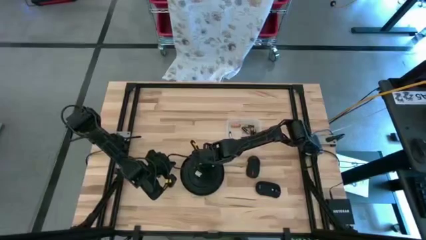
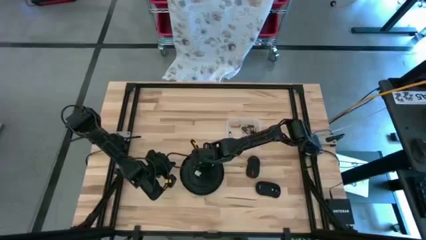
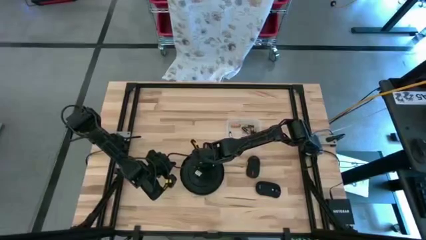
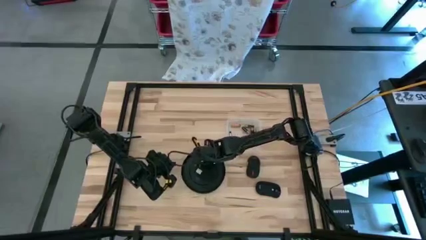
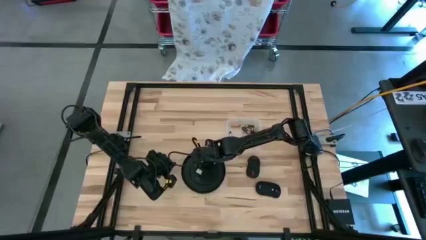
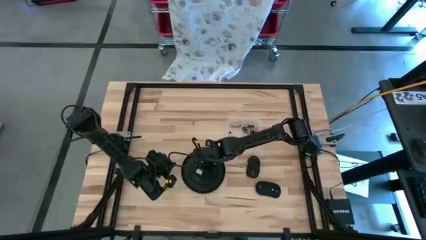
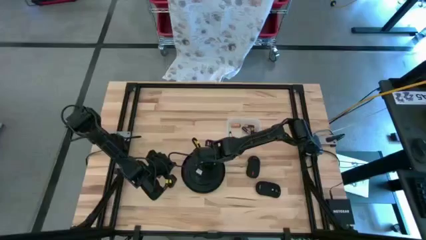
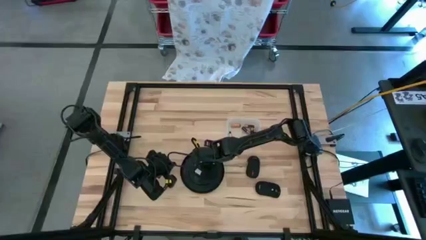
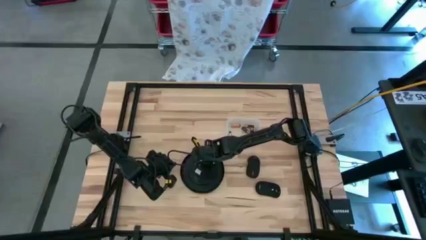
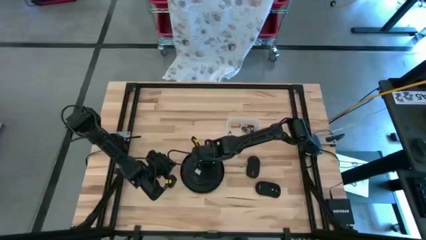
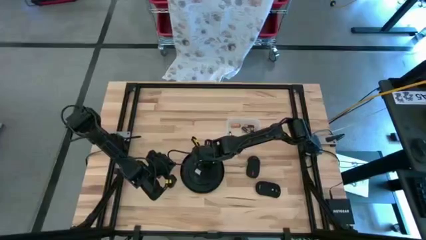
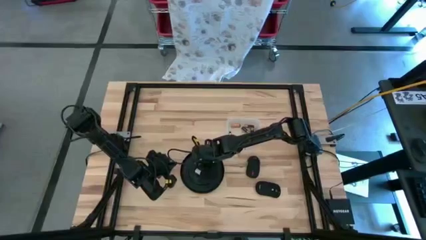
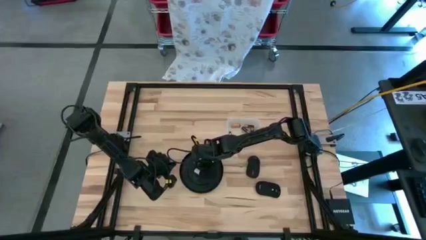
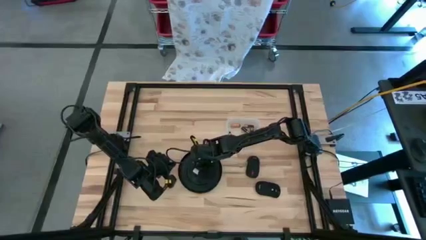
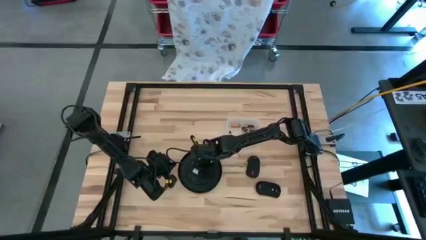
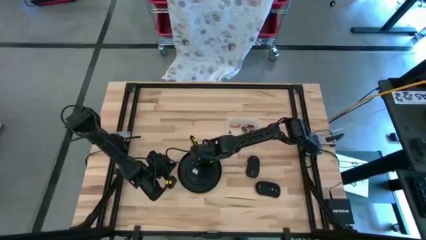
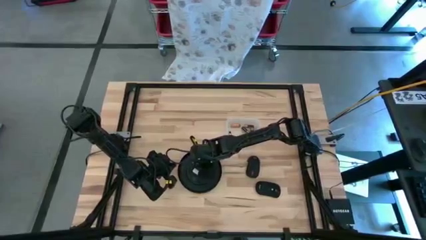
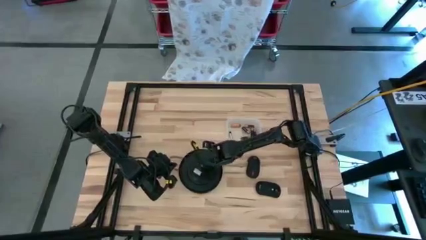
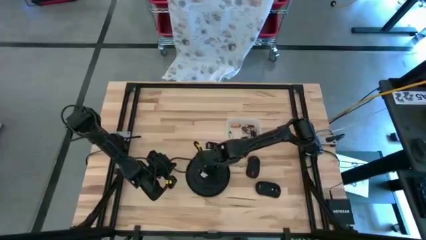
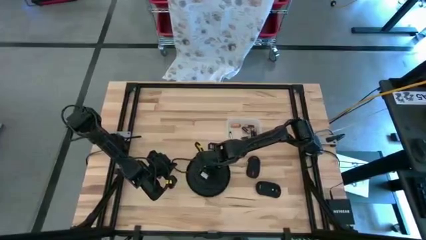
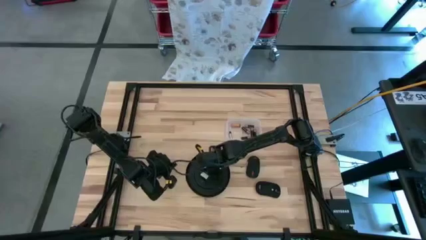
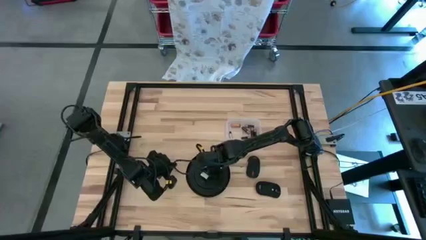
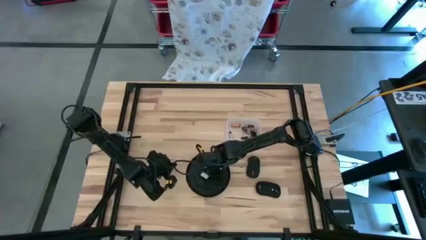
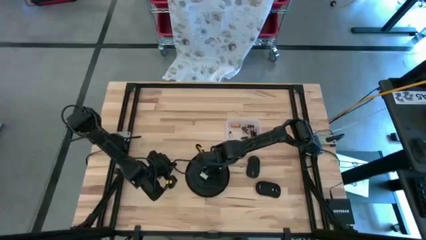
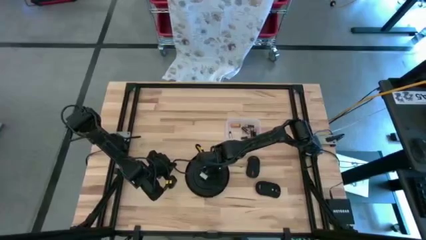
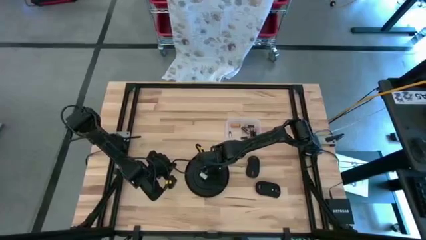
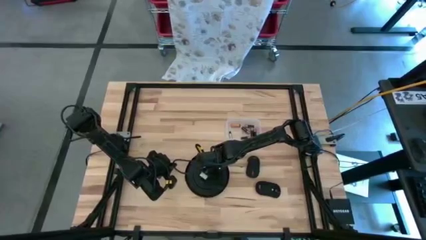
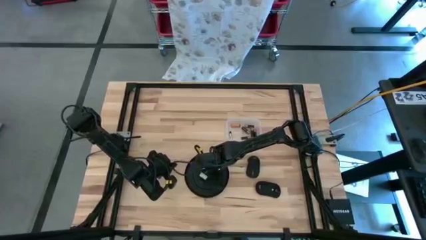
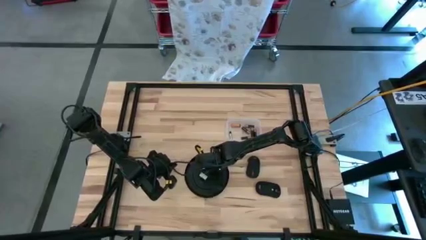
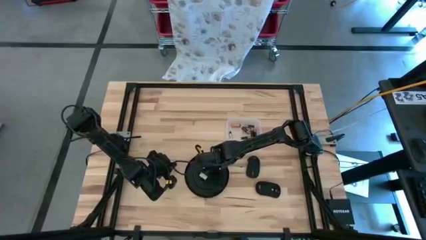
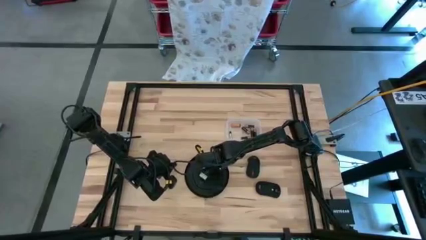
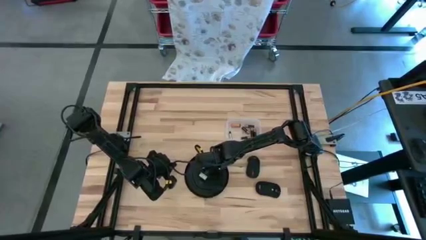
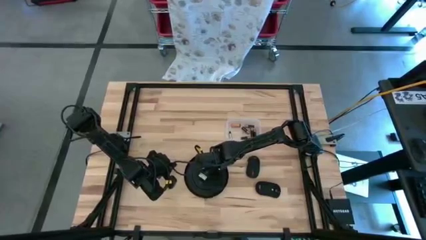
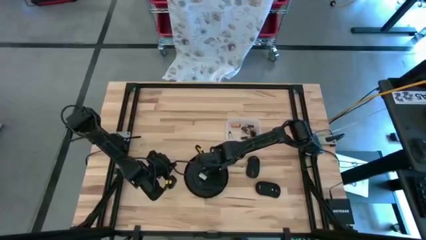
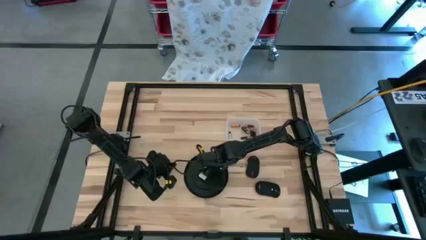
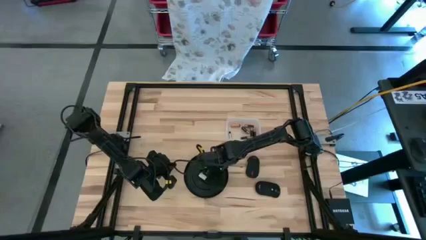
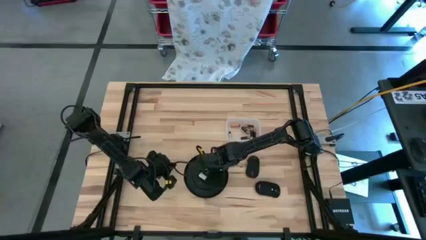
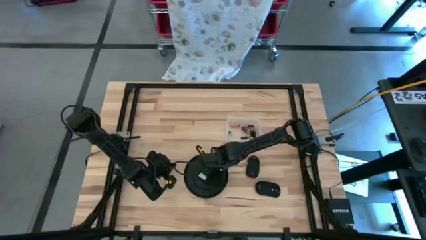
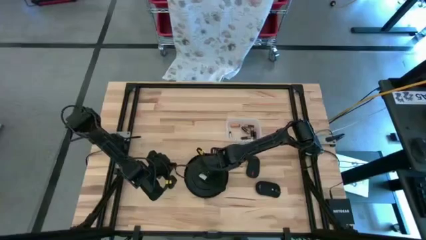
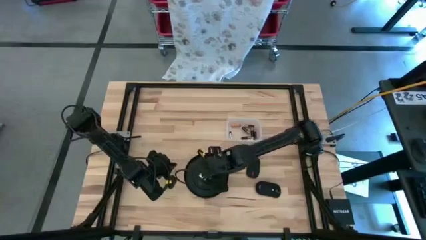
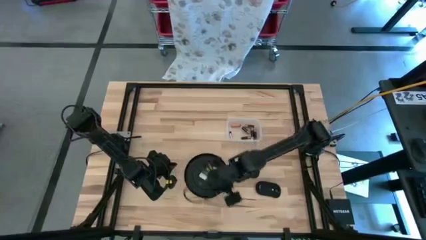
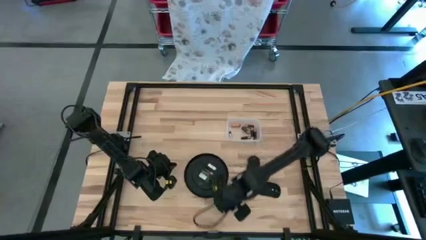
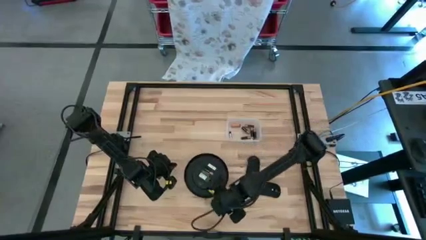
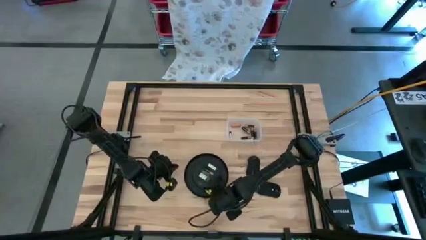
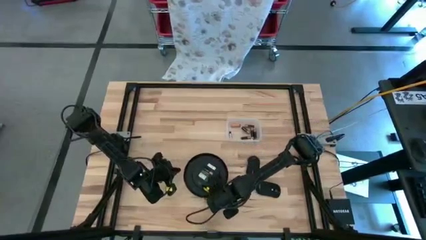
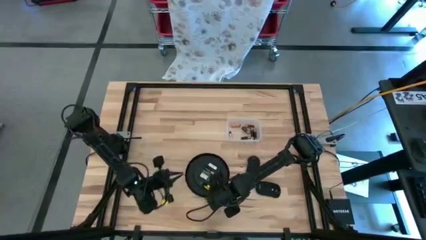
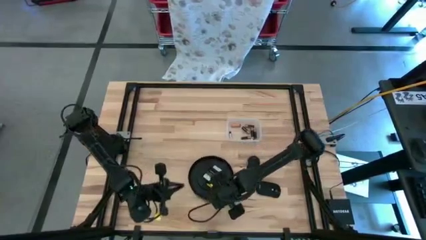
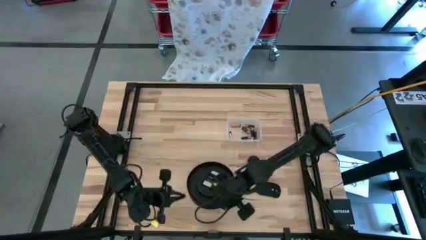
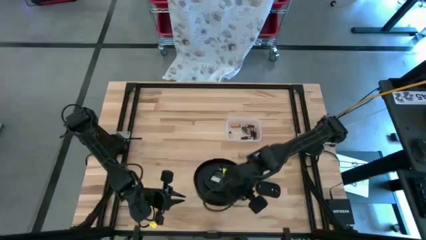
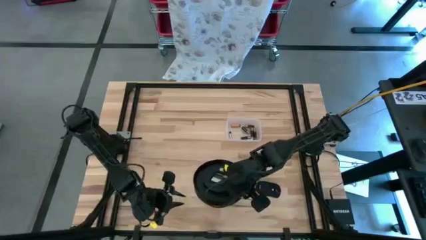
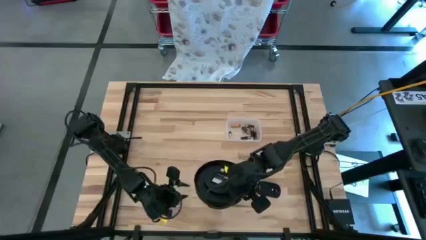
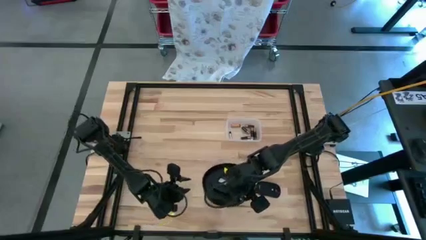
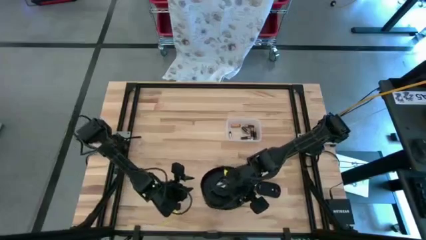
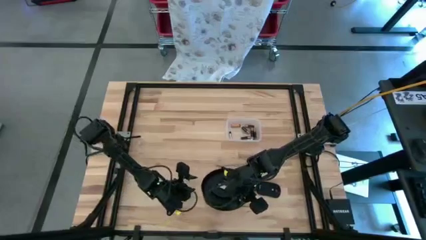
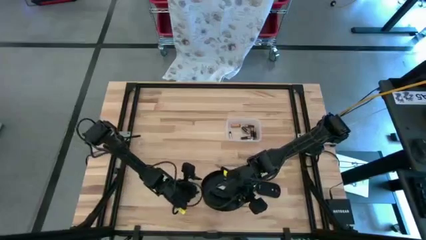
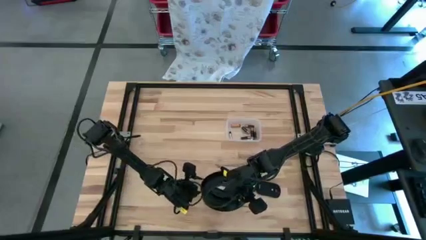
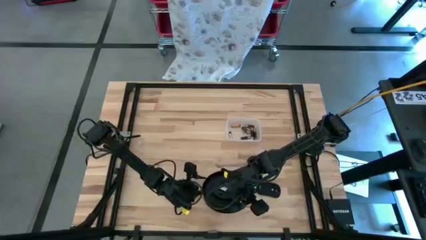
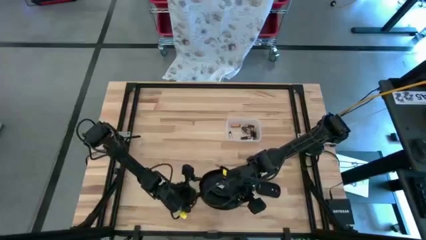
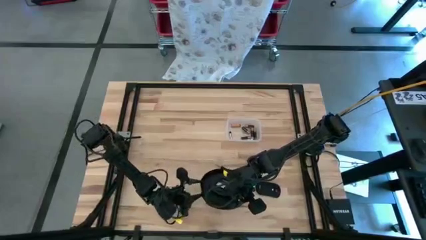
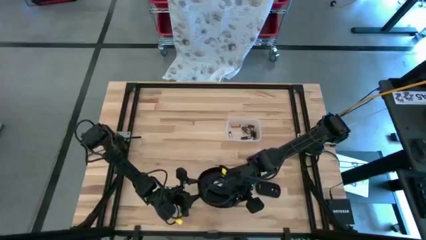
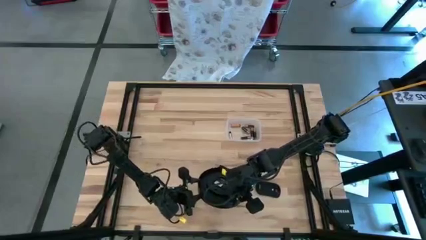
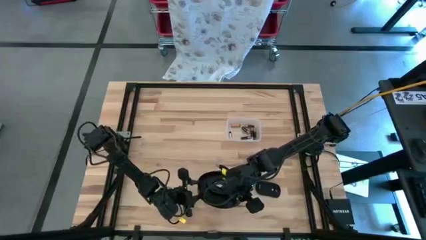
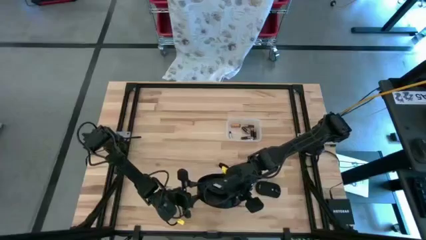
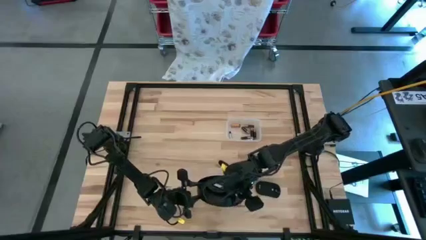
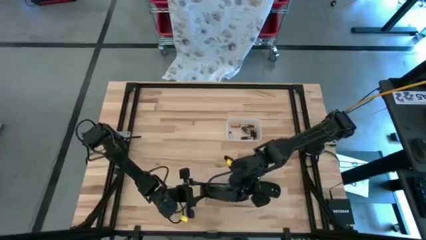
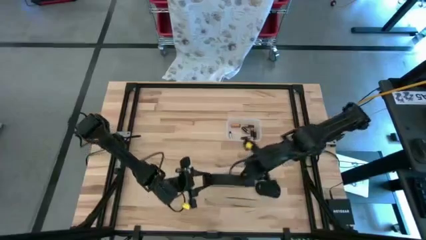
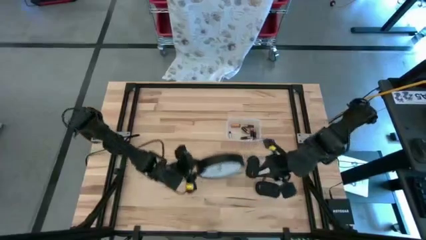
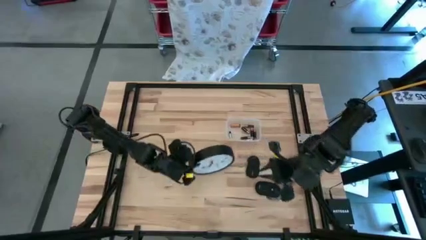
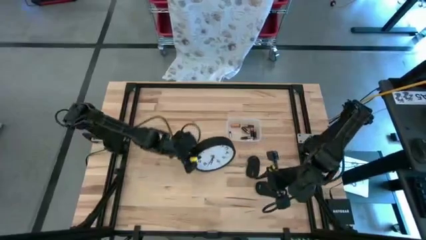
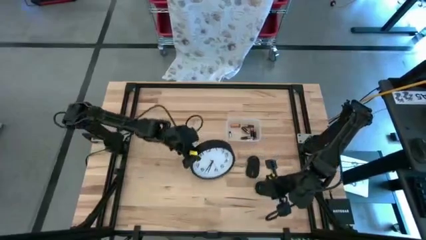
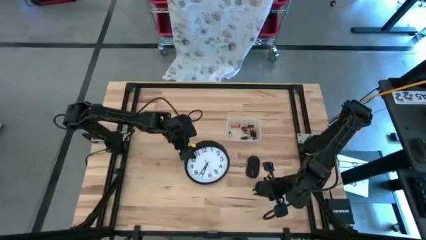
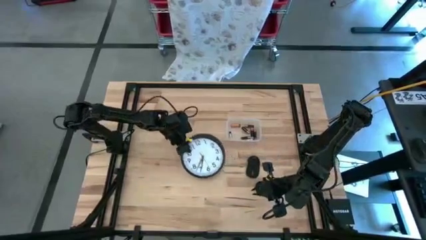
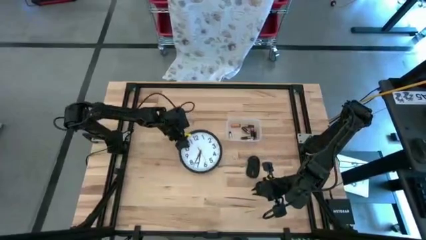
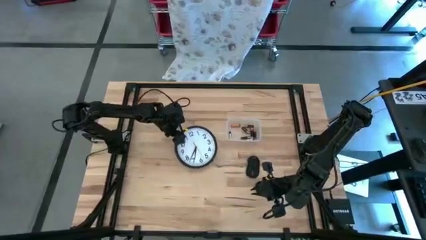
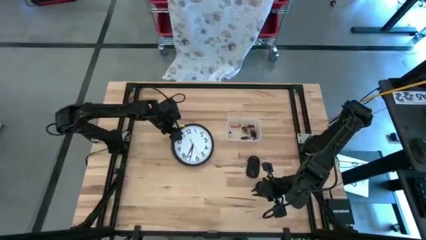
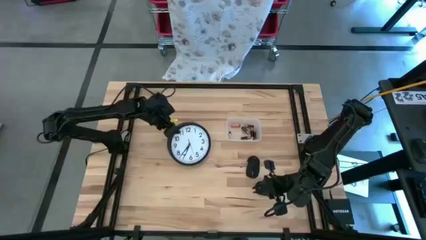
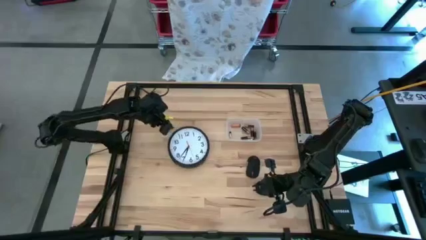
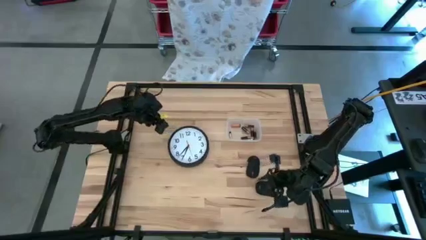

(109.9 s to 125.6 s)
Task: Insert battery
Insert the black battery into the wall clock
